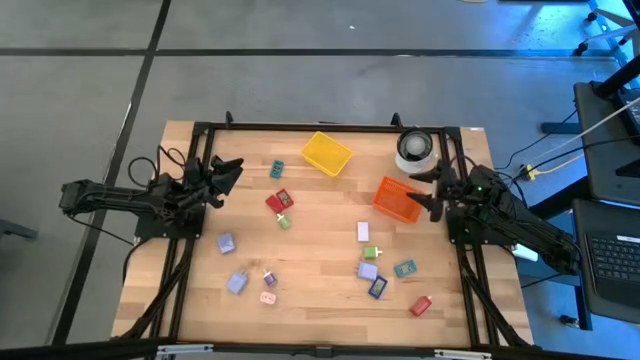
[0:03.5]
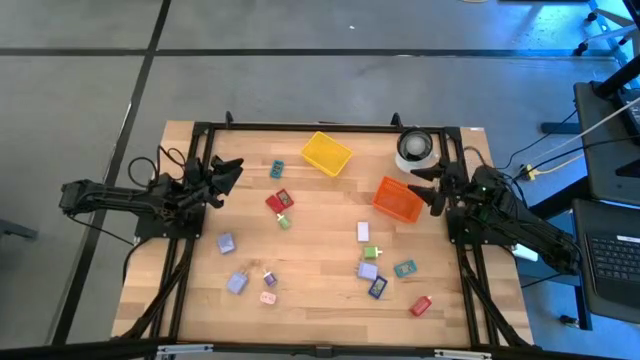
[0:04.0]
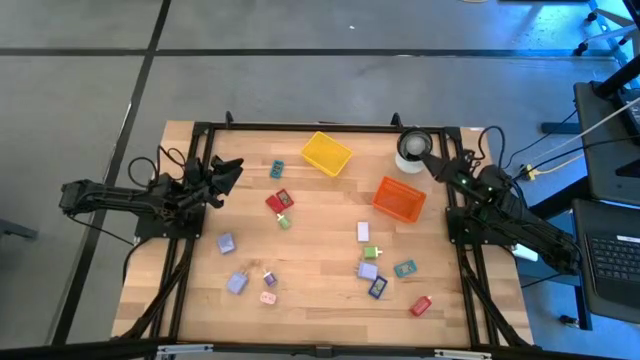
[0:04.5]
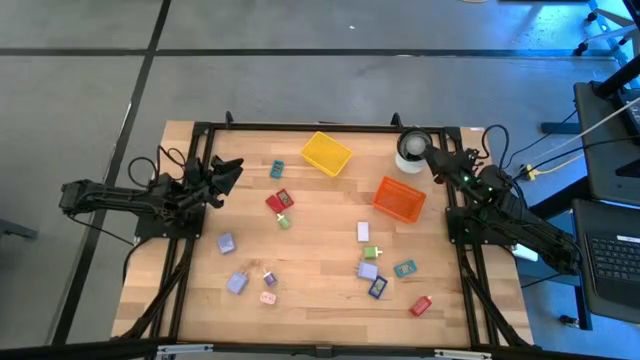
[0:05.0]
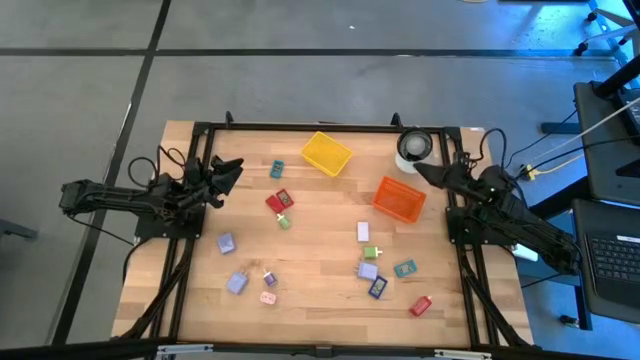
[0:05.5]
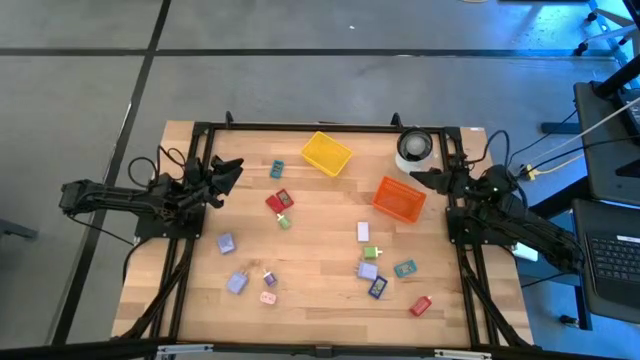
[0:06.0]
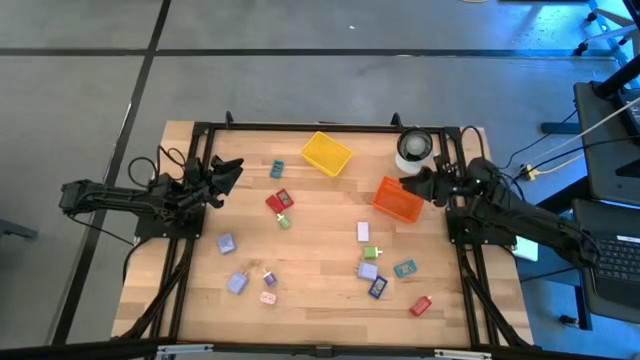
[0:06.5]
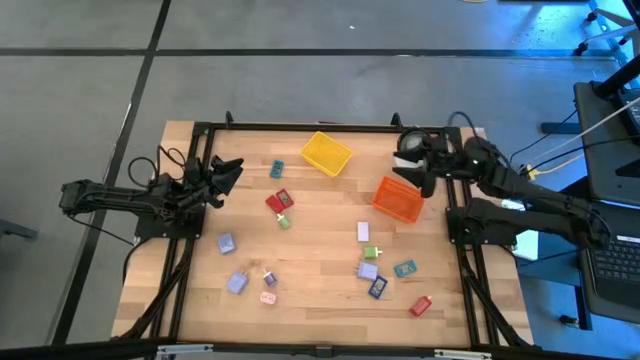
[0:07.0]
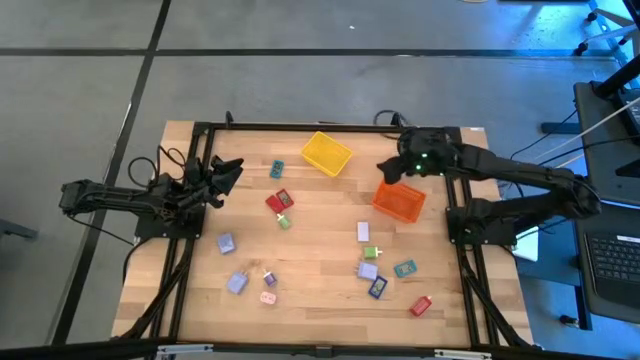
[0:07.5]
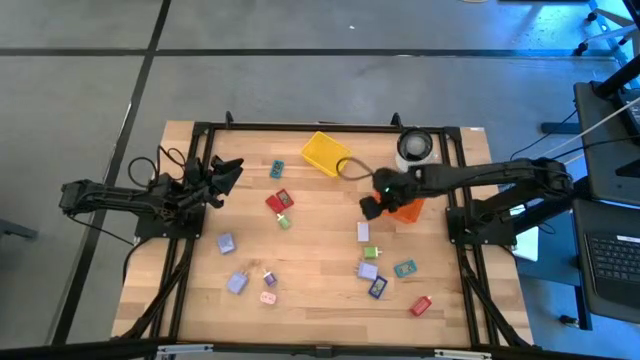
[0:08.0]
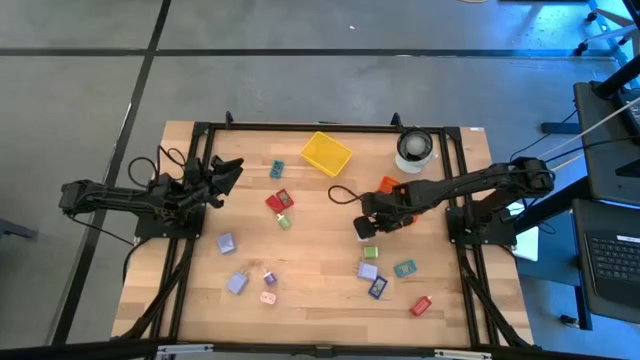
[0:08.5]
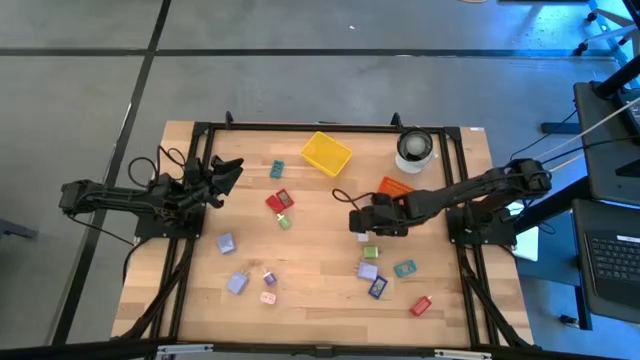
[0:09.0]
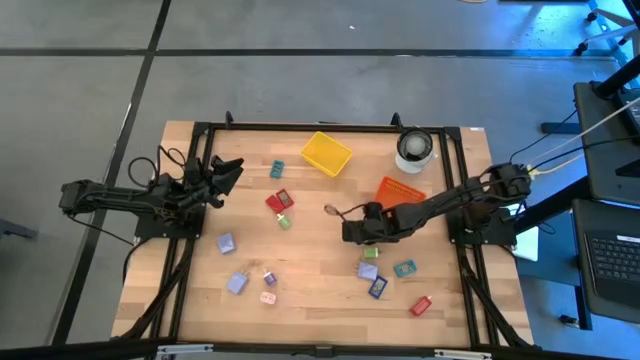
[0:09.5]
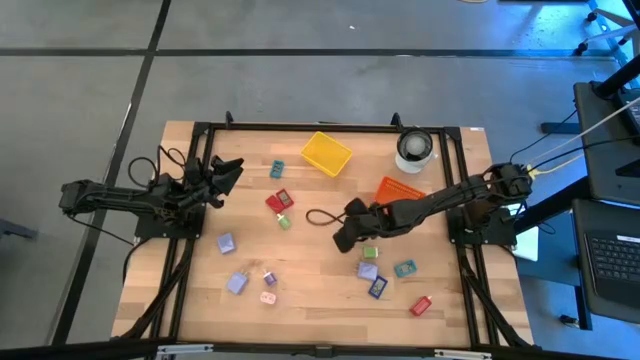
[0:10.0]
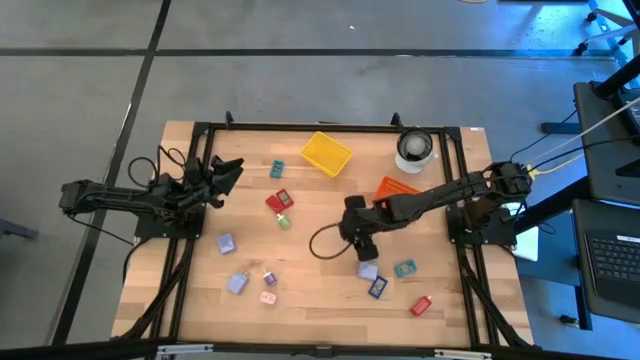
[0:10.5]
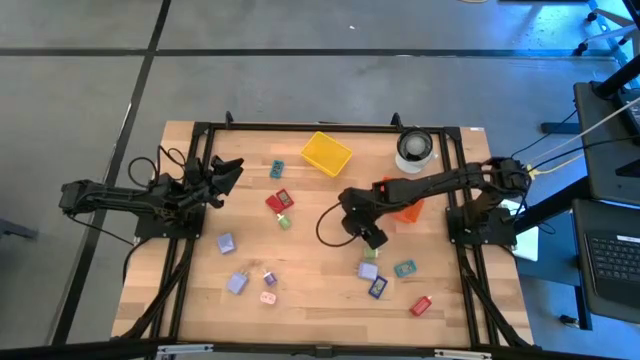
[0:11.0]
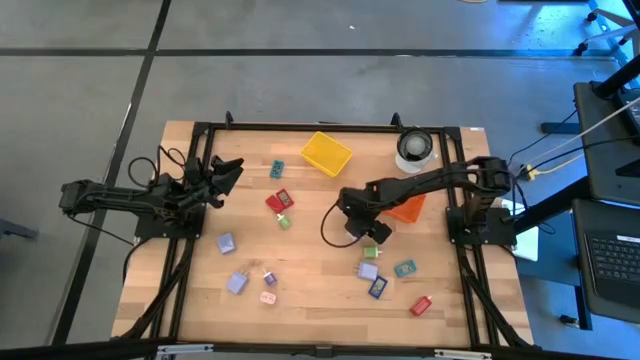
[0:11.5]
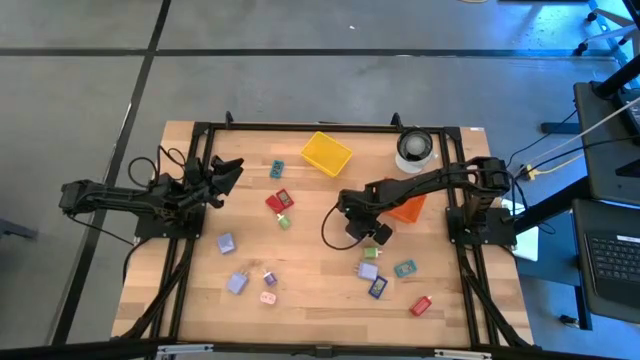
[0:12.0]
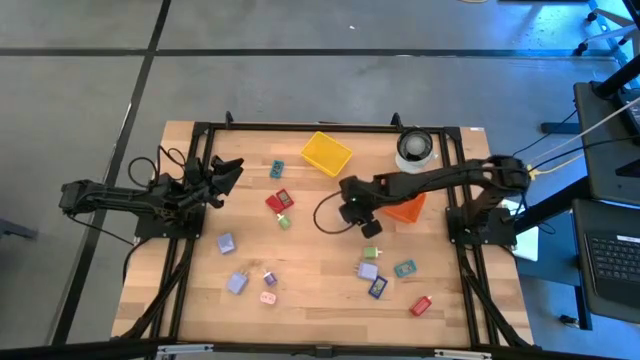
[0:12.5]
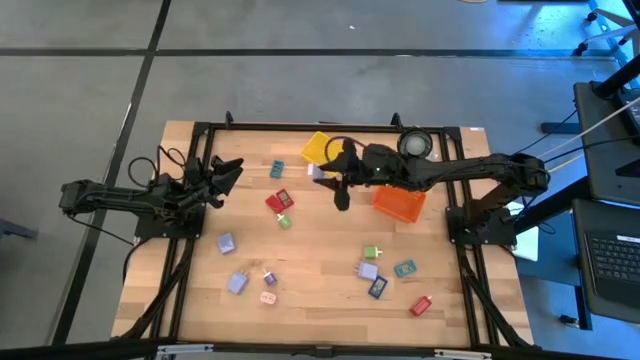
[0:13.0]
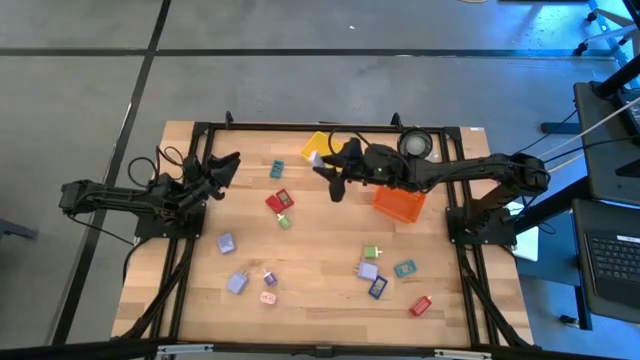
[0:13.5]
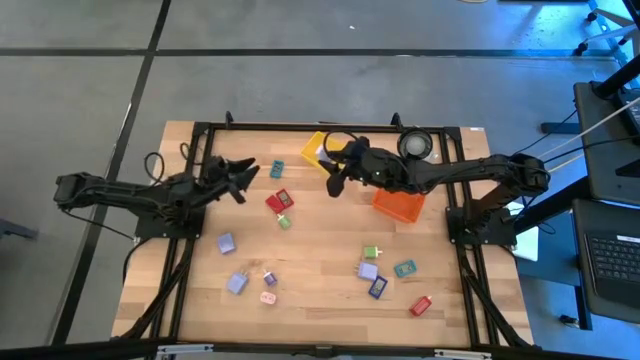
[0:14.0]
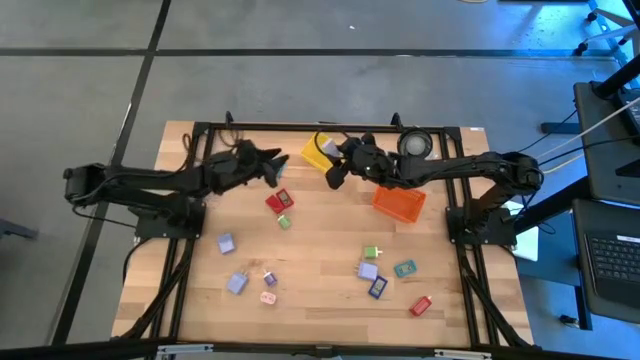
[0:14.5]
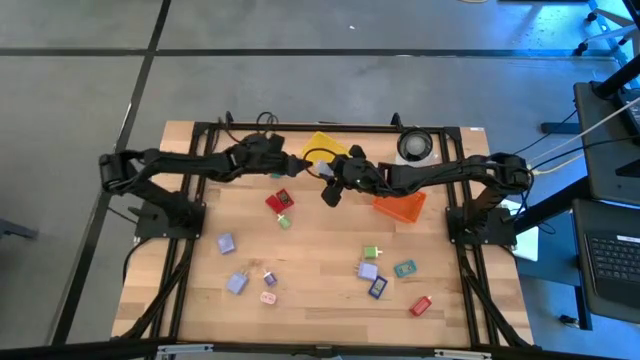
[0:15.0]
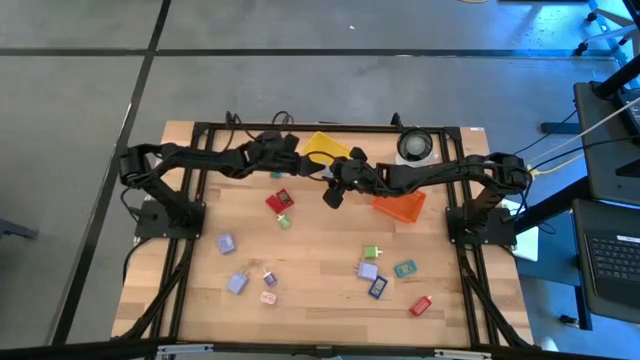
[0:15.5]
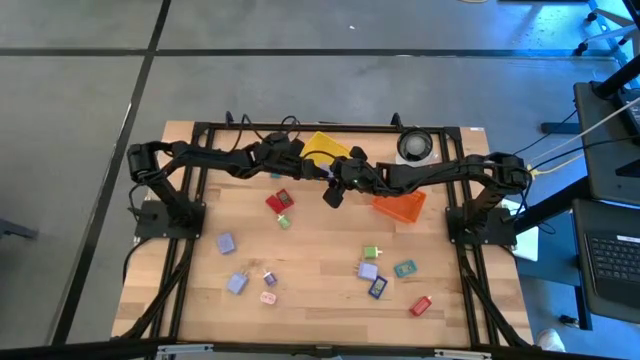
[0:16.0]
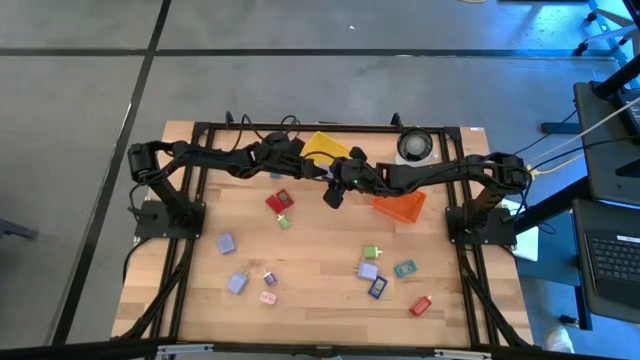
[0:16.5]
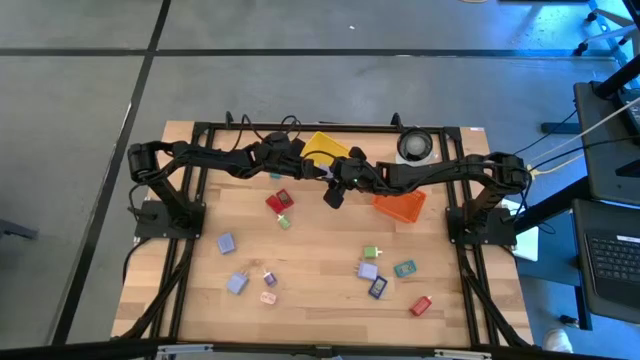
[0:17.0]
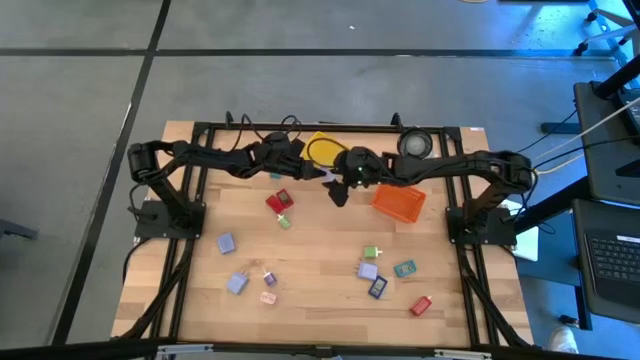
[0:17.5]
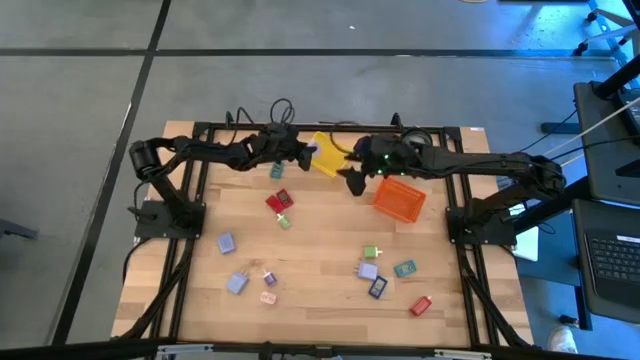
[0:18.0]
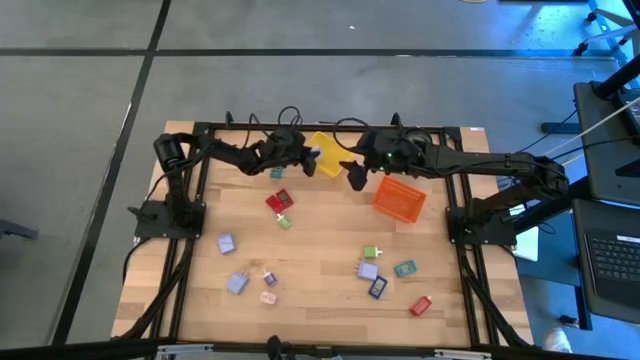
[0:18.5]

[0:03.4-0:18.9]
Task: Pick & Place Office items
Put the white digital clock into the yellow bin

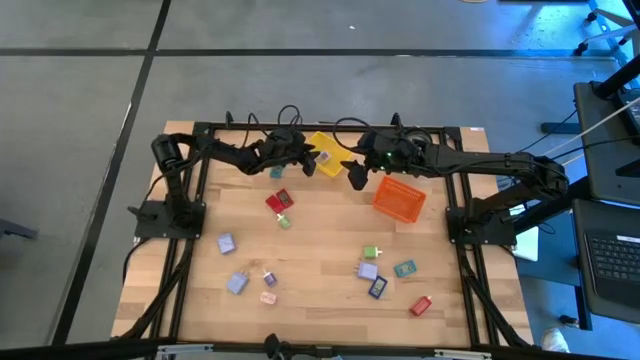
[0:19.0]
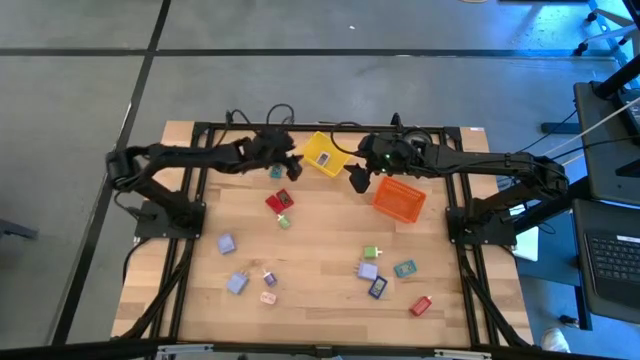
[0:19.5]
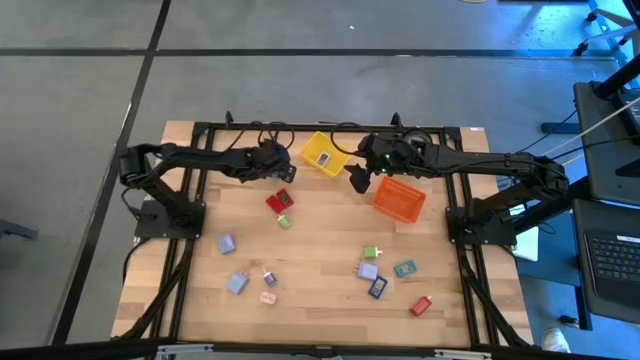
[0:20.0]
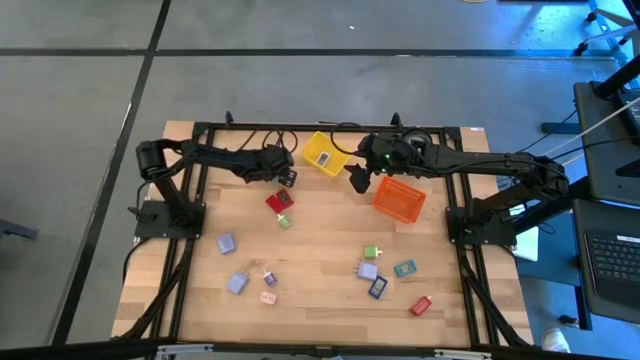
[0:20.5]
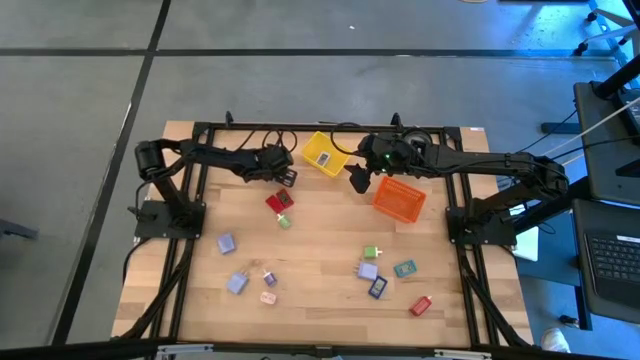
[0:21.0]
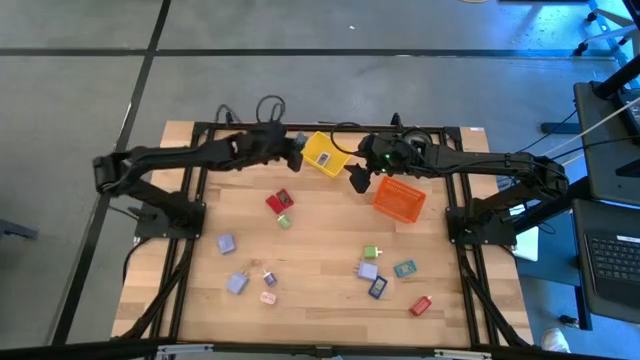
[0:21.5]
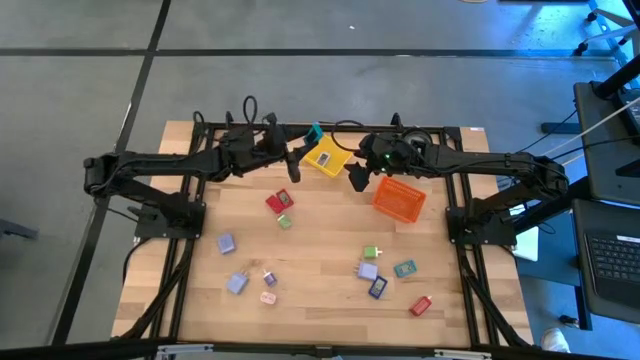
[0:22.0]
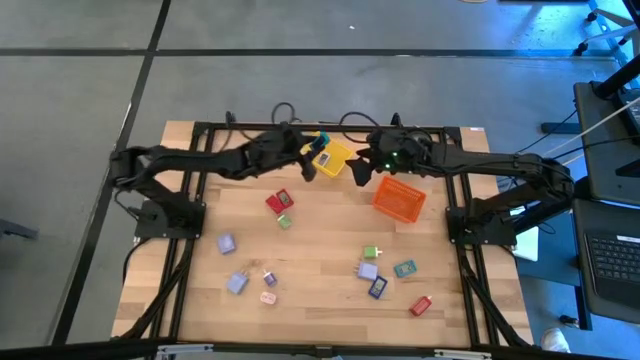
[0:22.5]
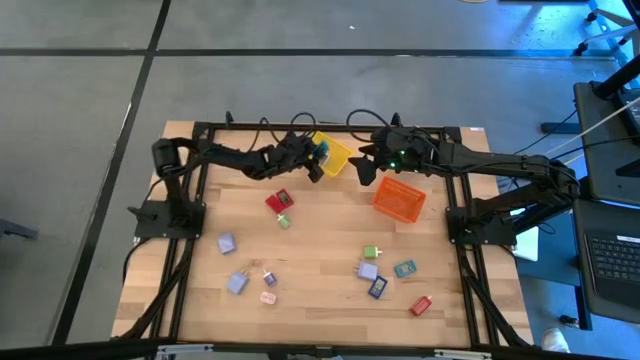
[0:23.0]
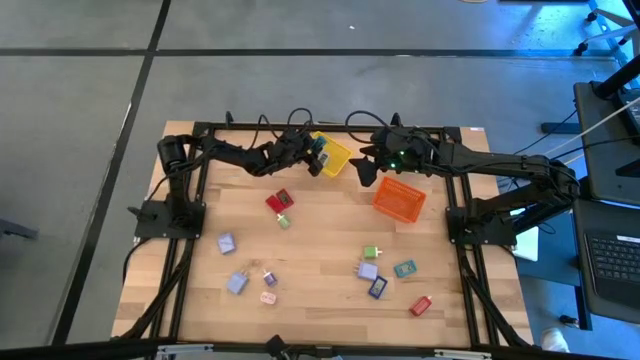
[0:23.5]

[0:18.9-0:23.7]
Put the top light blue digital clock into the yellow bin

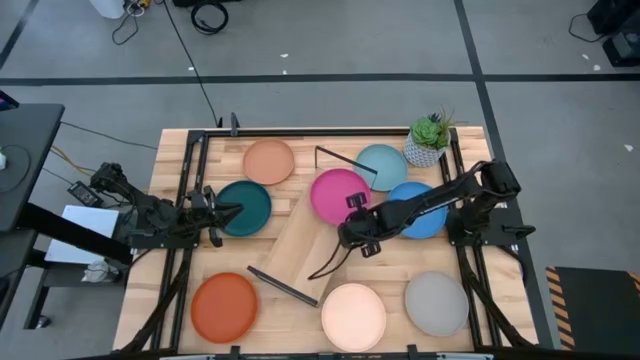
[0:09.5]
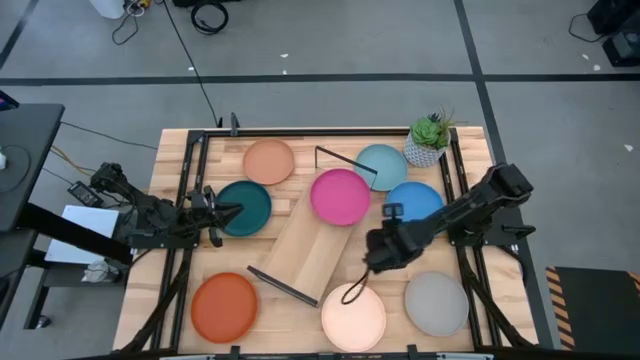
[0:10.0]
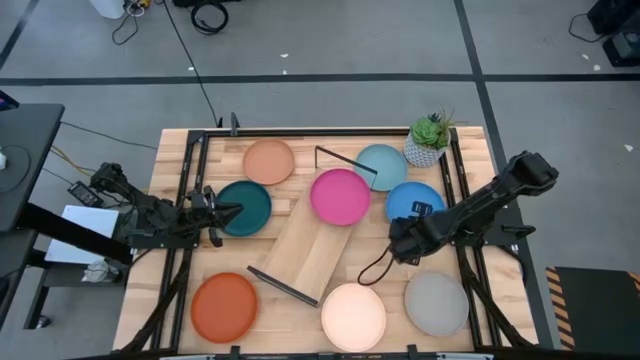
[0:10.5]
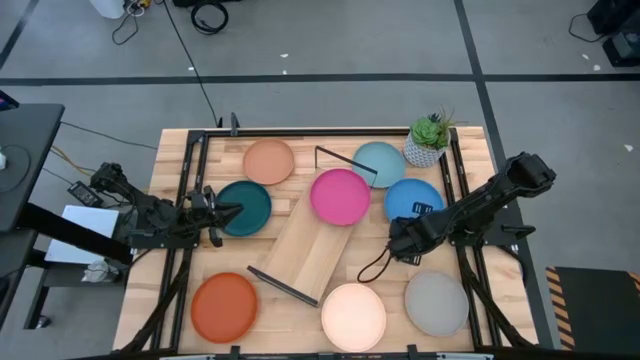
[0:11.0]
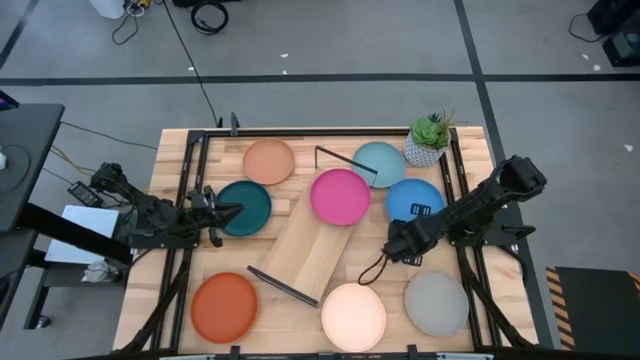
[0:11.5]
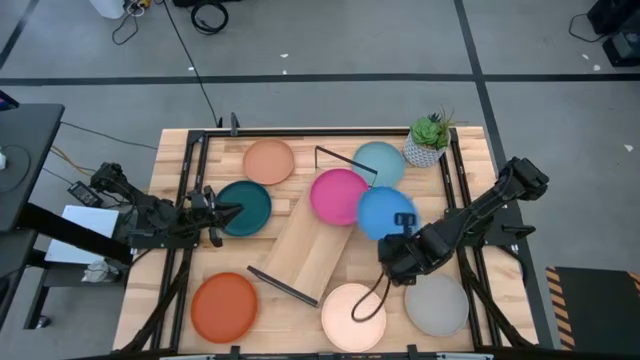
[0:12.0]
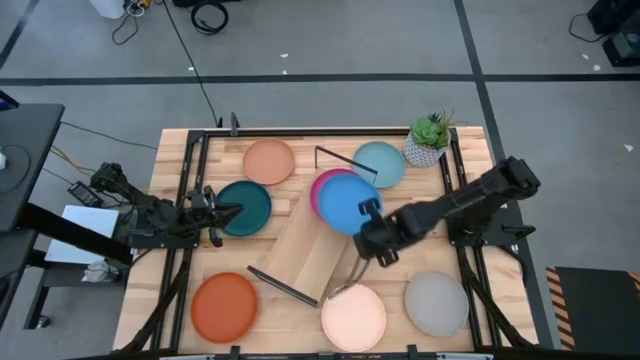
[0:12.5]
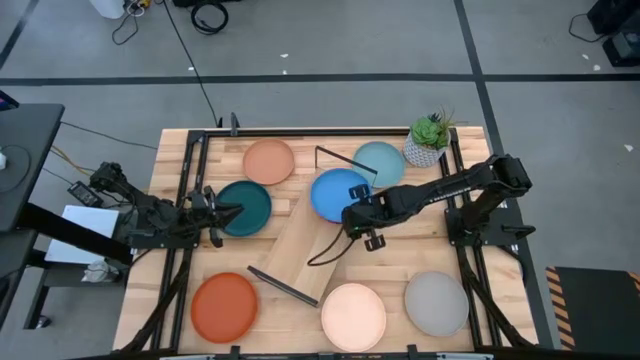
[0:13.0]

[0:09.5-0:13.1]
Task: Place and stack plates onto a shelf
Stack the blue plate on top of the pink plate on the shelf
